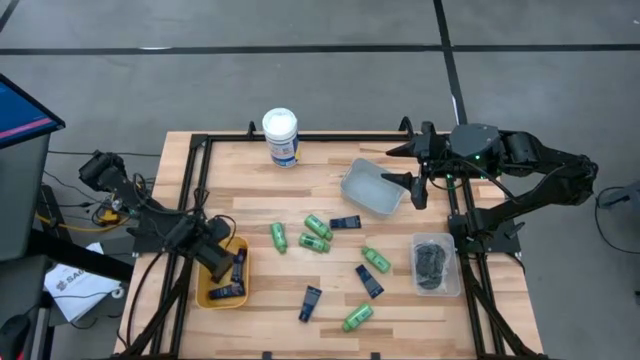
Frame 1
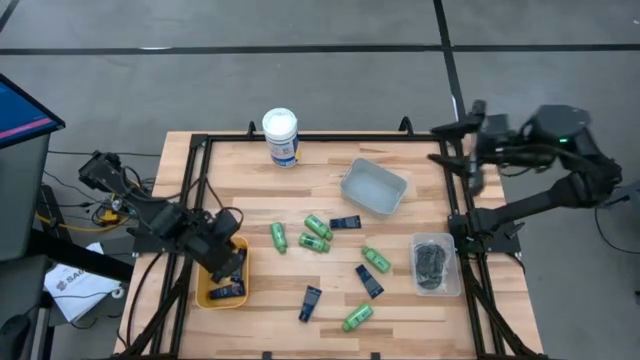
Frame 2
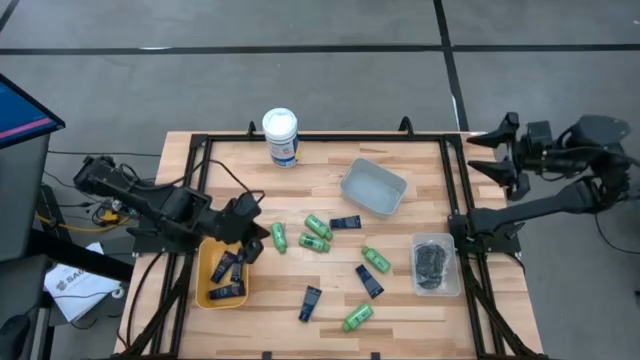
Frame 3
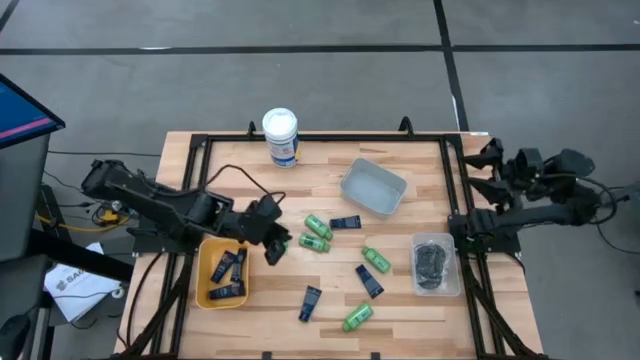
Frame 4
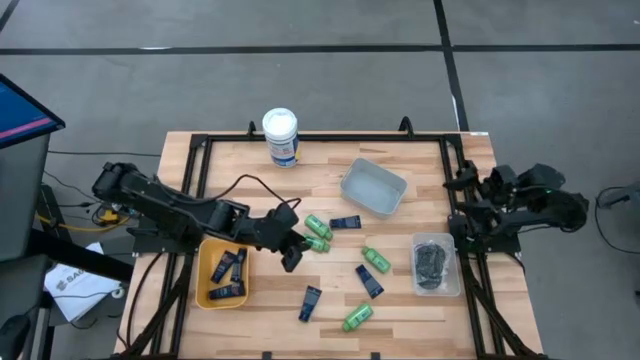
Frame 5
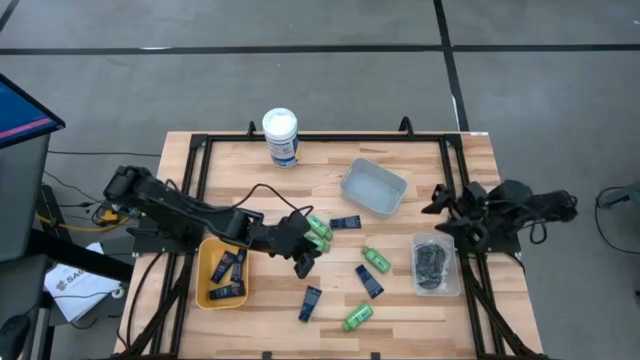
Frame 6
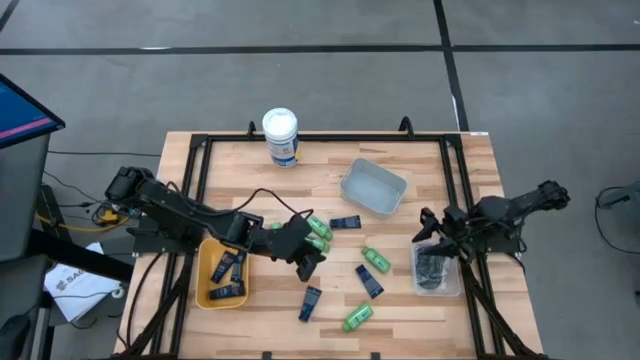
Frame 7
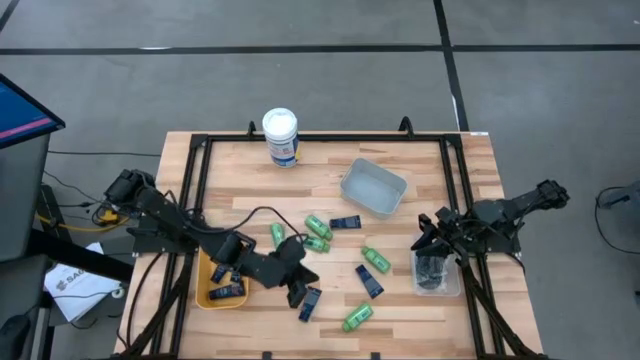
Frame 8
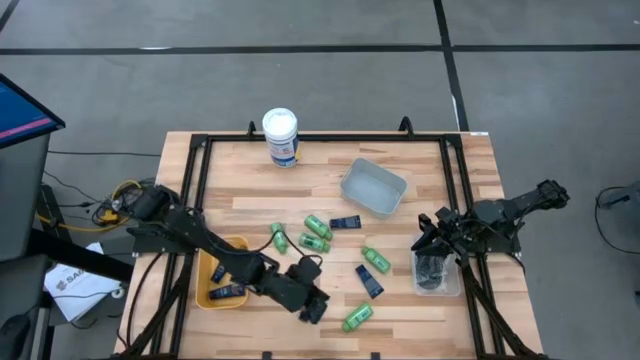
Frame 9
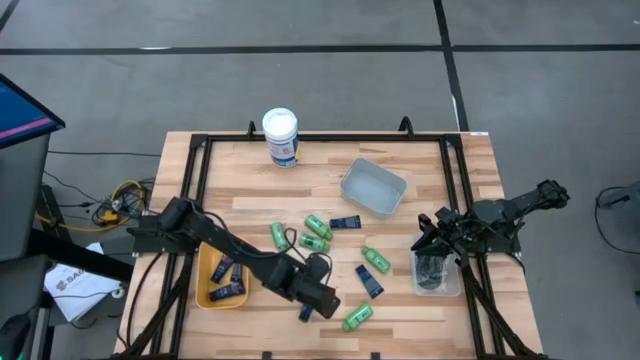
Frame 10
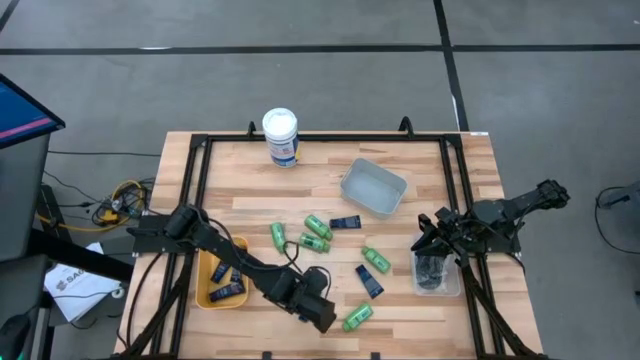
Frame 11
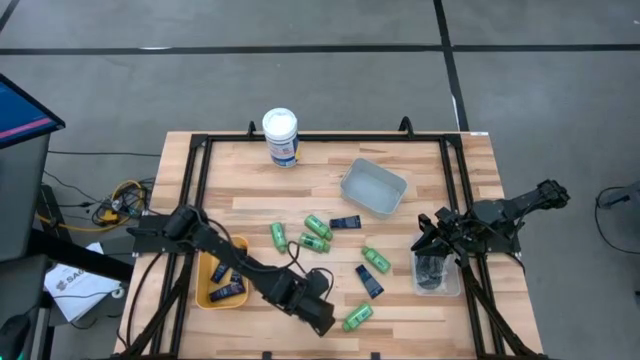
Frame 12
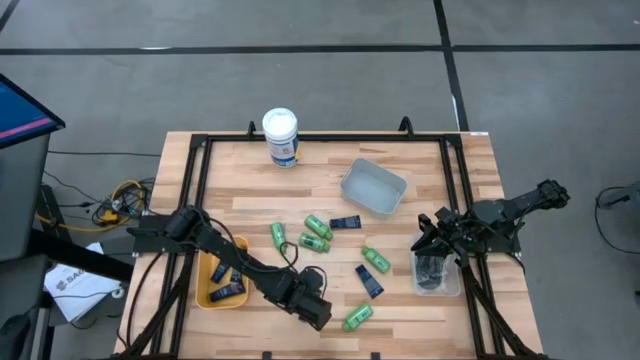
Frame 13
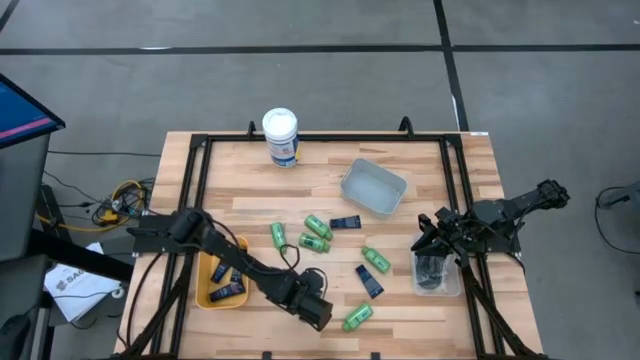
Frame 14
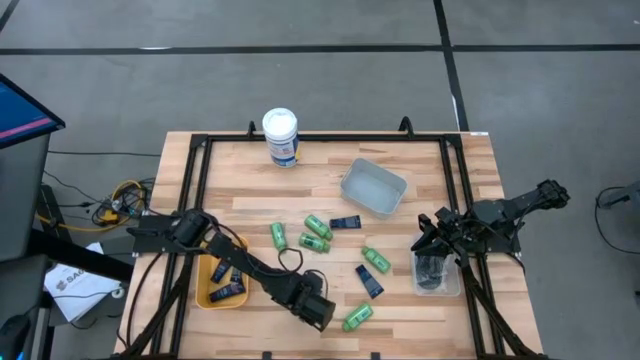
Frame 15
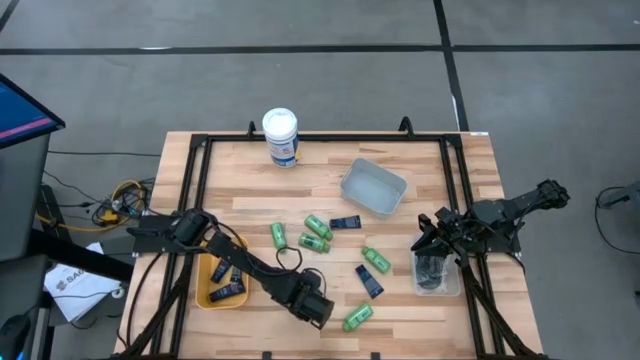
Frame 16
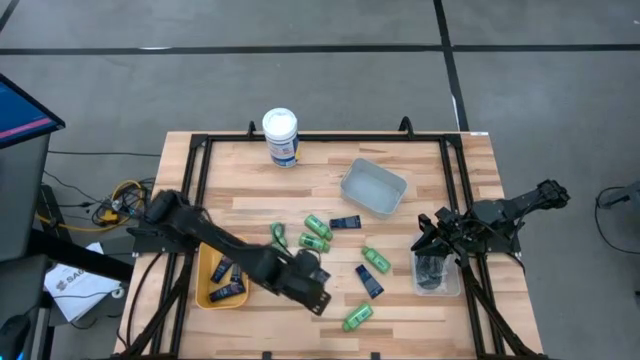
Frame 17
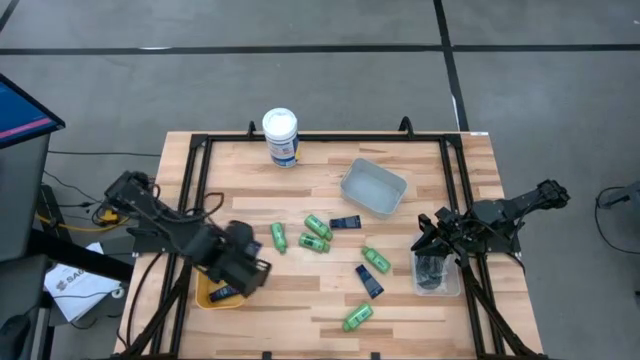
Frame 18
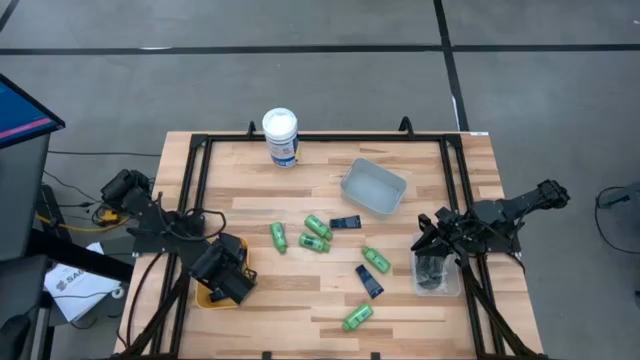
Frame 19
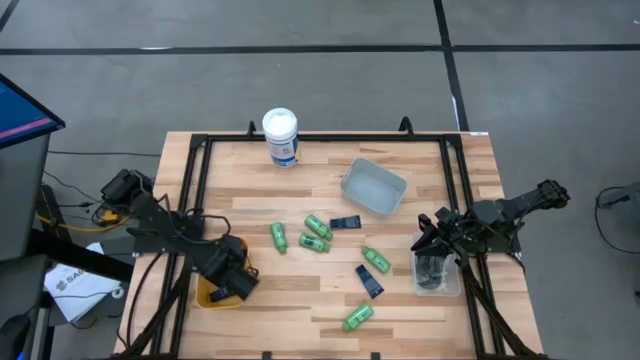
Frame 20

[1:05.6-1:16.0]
Task: Pick & Place Travel size toiletries
Put the blue shave cream into the light orange bin

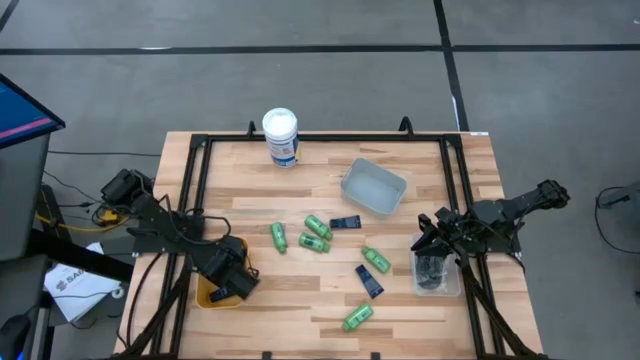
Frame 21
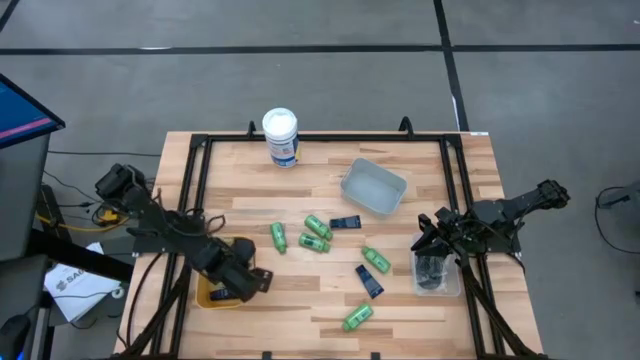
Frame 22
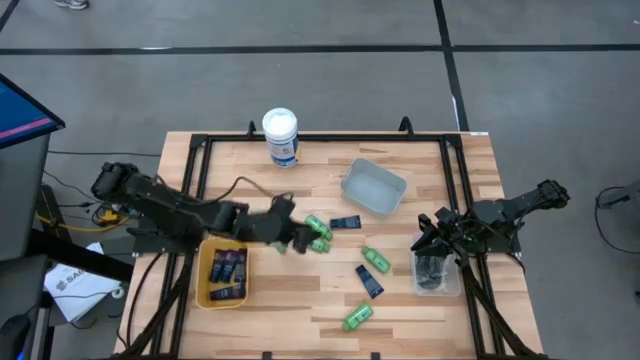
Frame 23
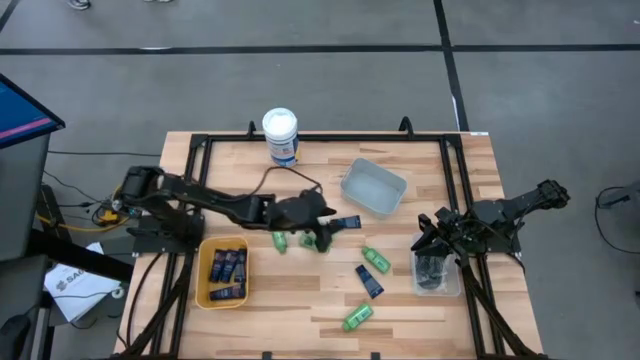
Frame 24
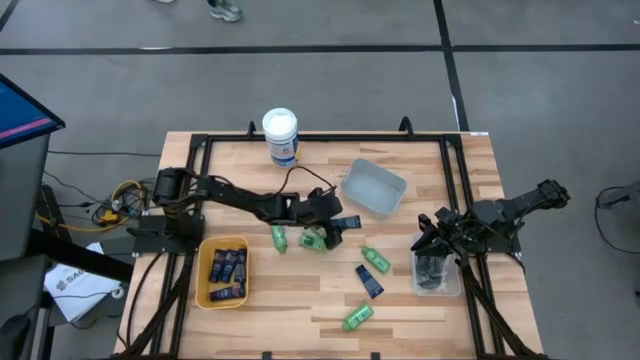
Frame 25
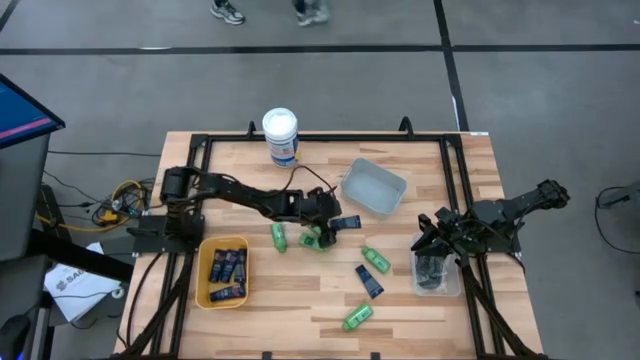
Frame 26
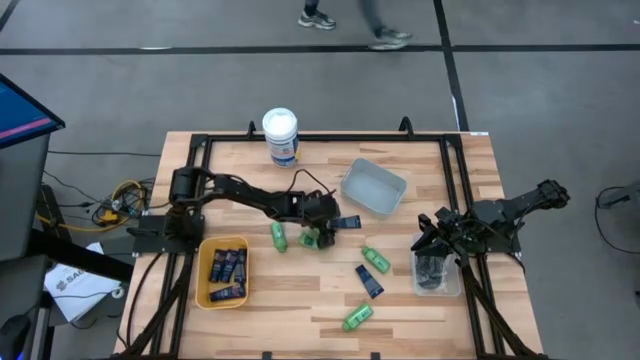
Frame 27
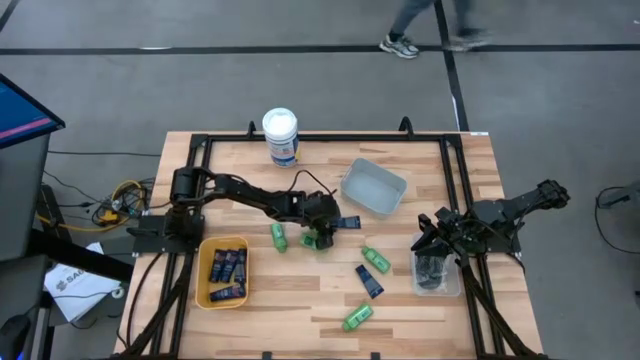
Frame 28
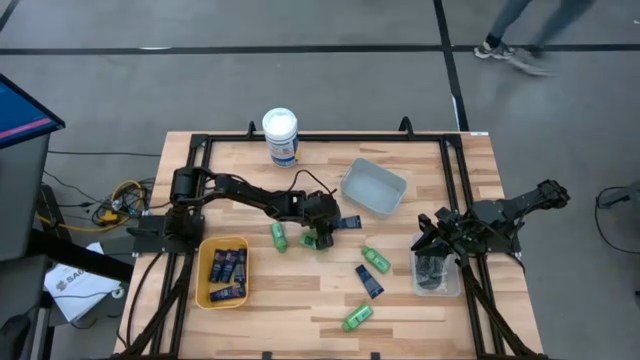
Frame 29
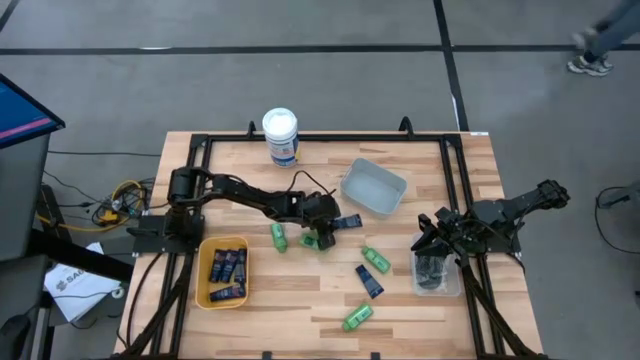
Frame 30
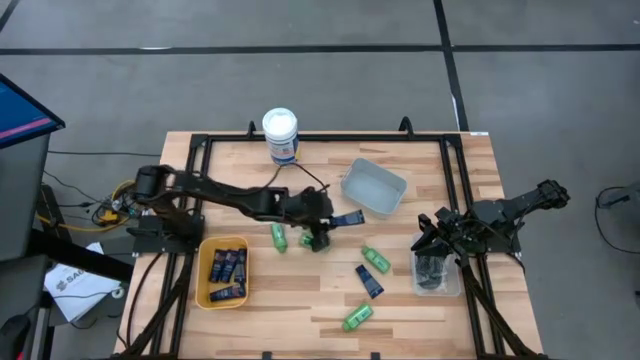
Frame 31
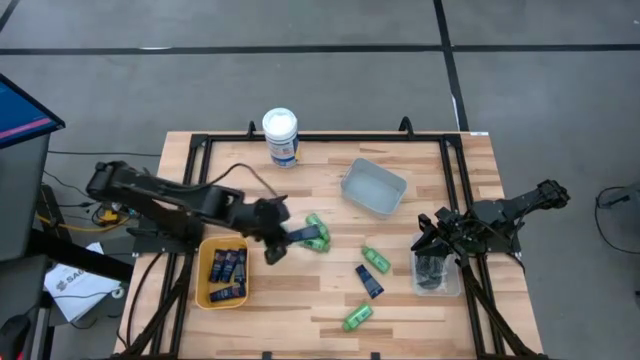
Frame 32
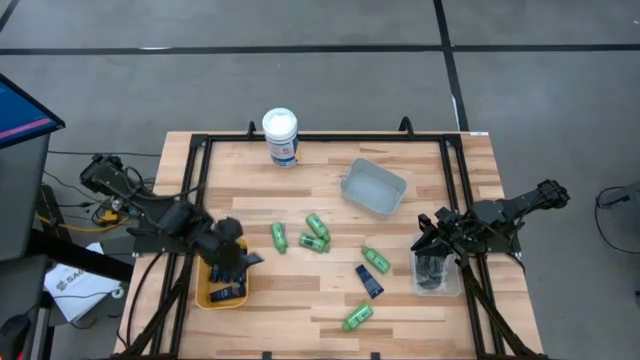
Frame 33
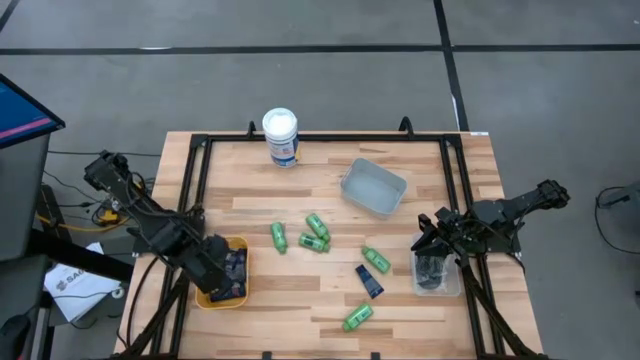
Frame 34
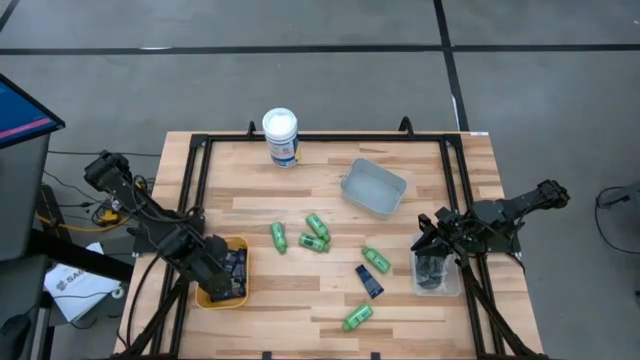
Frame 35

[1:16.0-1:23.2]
Put the blue shave cream into the light orange bin

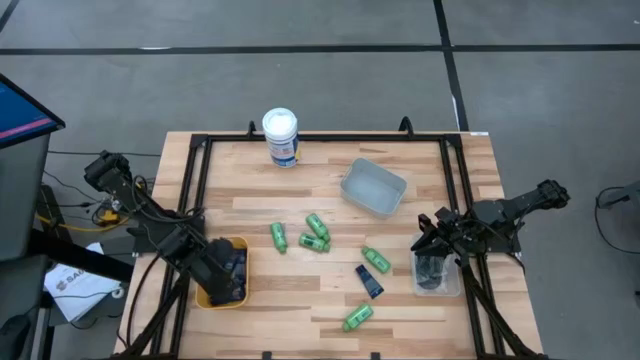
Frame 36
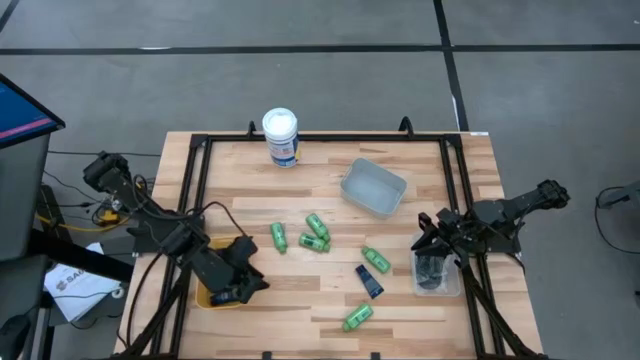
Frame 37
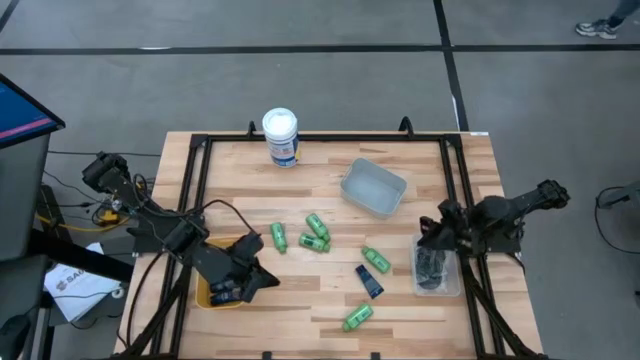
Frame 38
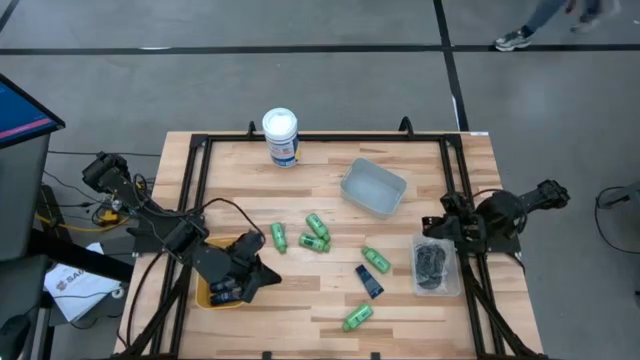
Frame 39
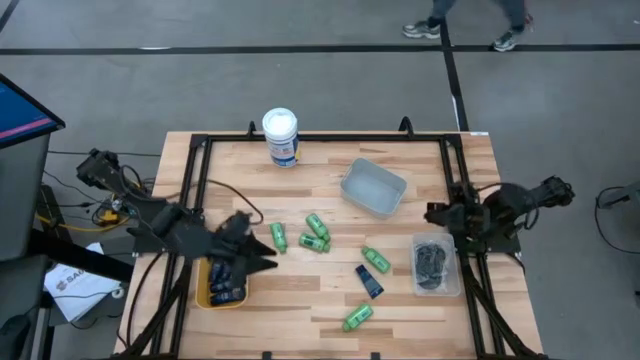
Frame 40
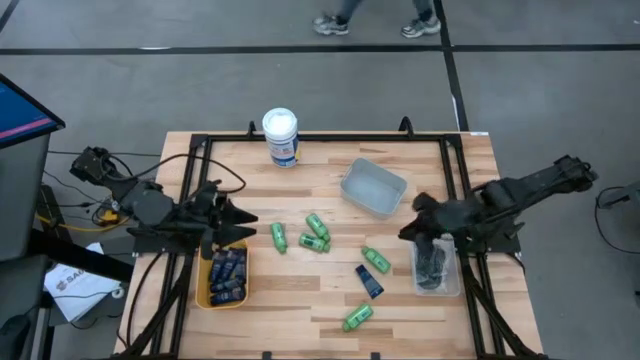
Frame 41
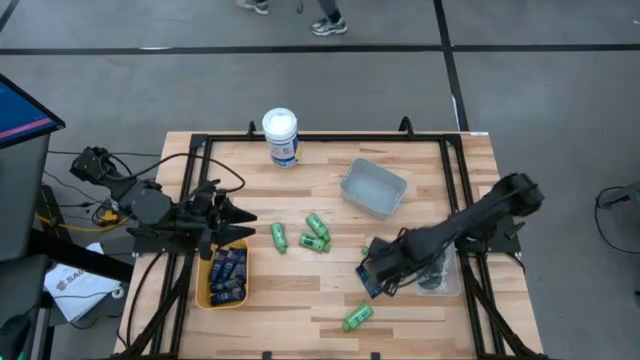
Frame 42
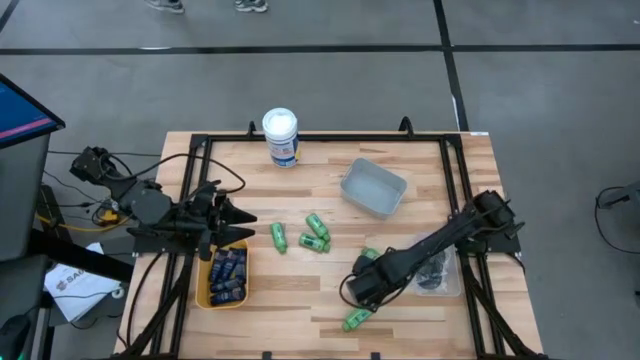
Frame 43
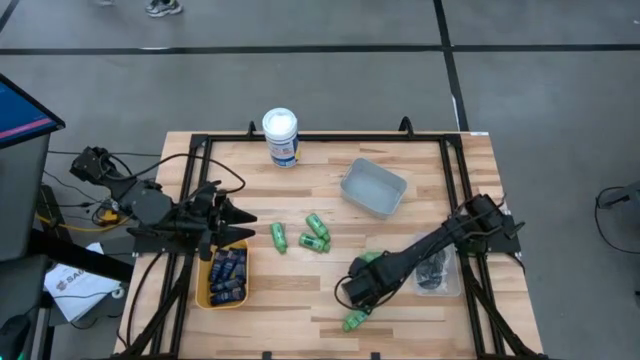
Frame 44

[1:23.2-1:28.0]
Put the blue shave cream into the light orange bin
